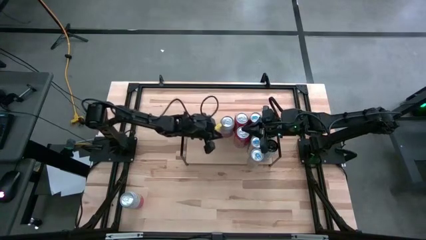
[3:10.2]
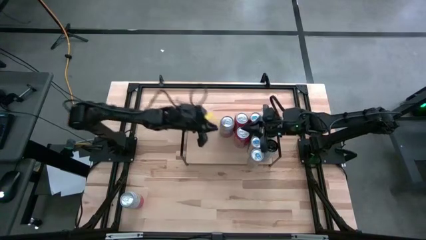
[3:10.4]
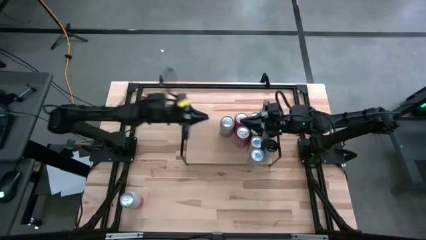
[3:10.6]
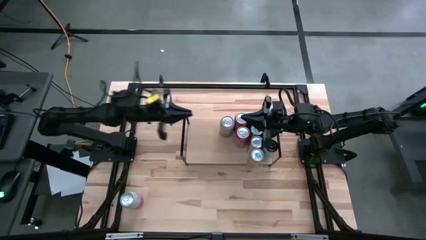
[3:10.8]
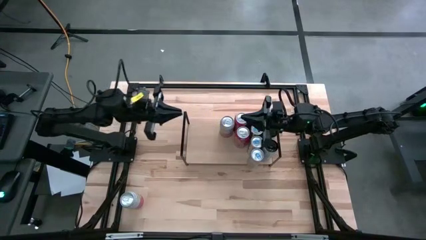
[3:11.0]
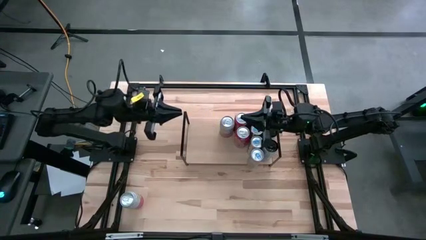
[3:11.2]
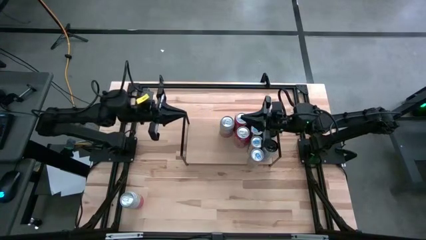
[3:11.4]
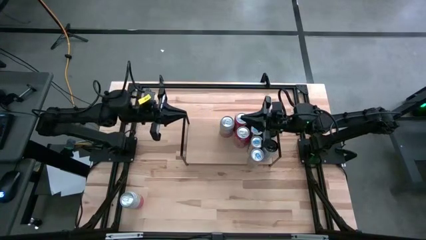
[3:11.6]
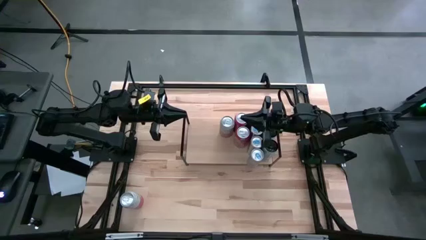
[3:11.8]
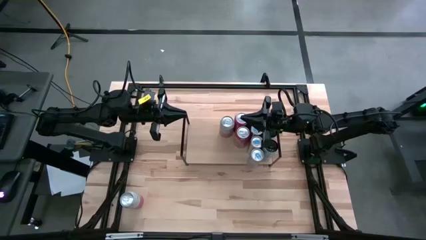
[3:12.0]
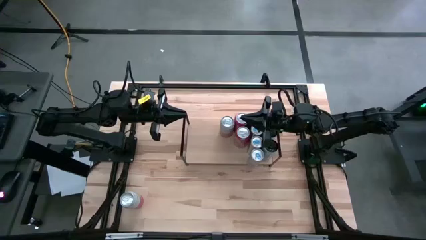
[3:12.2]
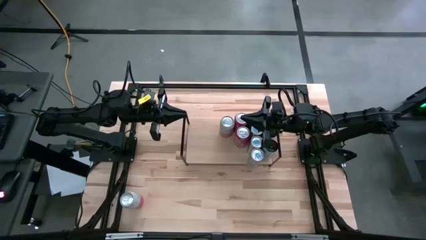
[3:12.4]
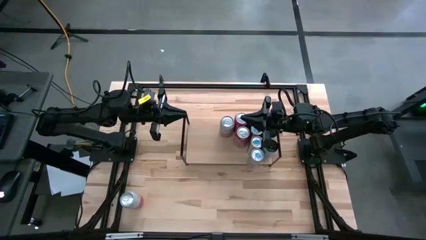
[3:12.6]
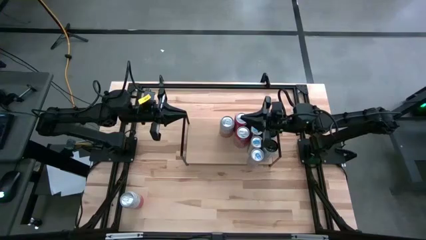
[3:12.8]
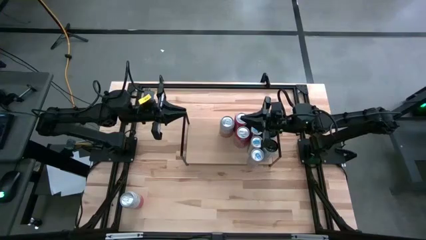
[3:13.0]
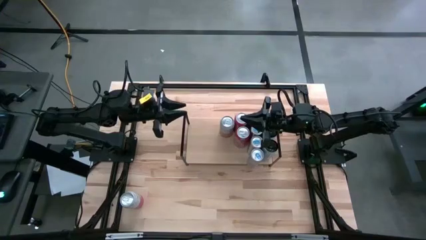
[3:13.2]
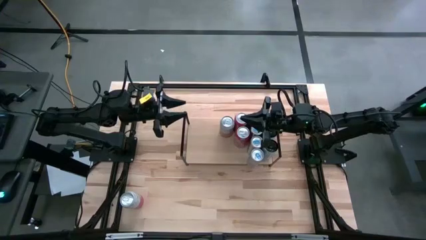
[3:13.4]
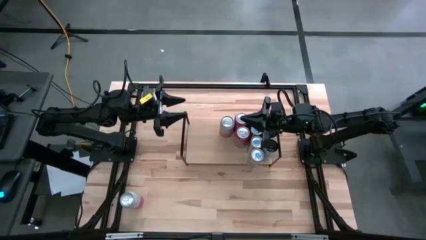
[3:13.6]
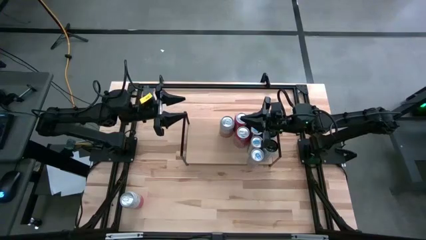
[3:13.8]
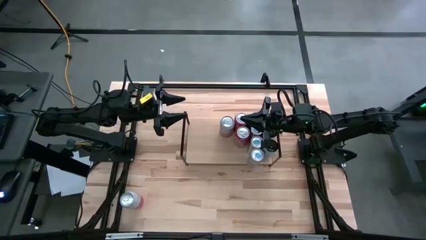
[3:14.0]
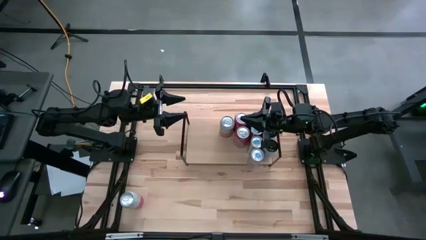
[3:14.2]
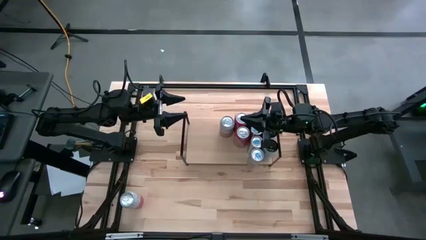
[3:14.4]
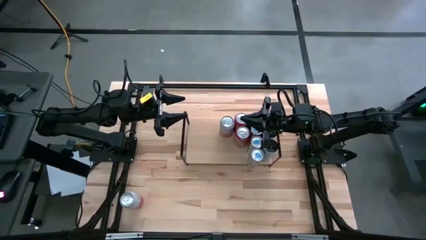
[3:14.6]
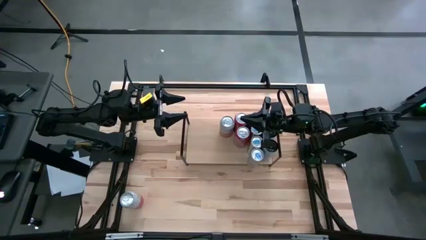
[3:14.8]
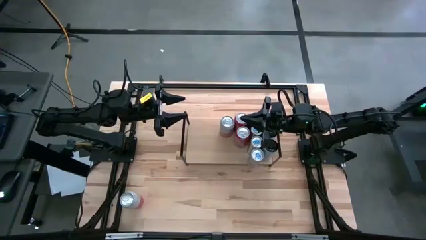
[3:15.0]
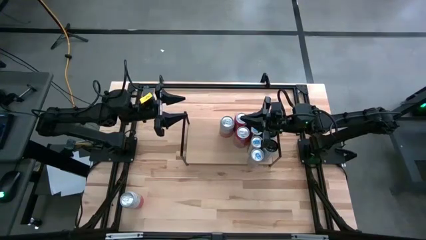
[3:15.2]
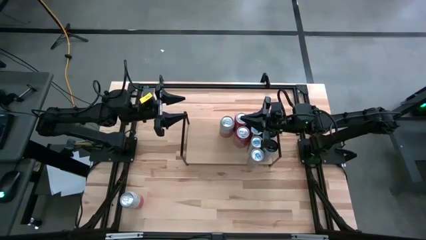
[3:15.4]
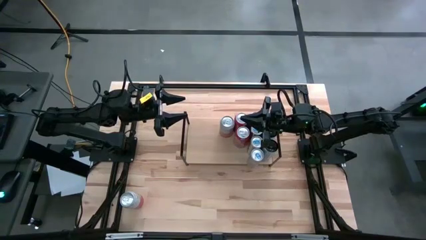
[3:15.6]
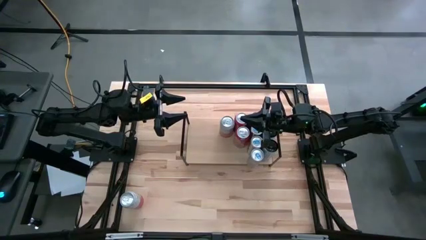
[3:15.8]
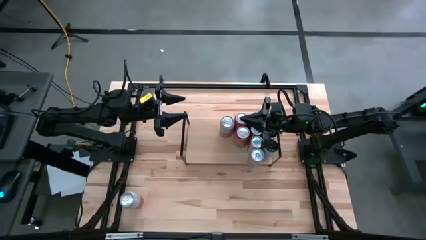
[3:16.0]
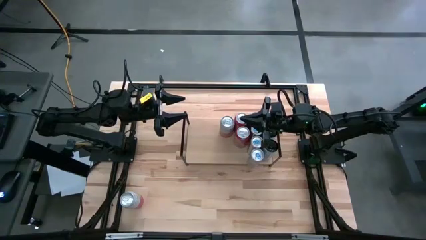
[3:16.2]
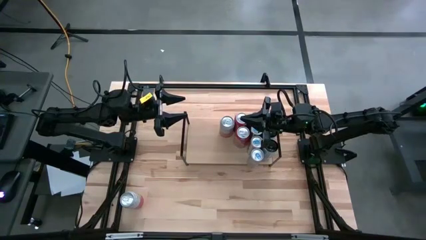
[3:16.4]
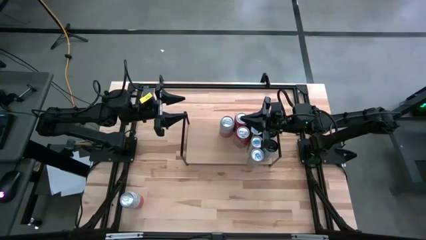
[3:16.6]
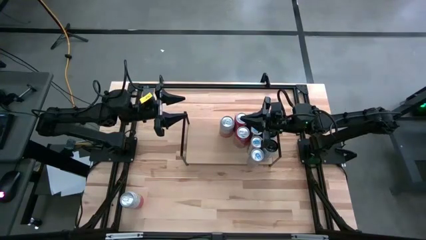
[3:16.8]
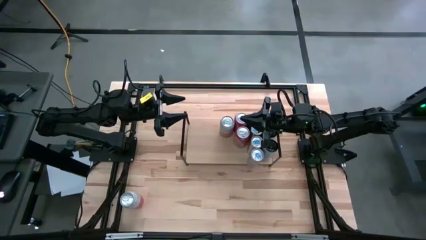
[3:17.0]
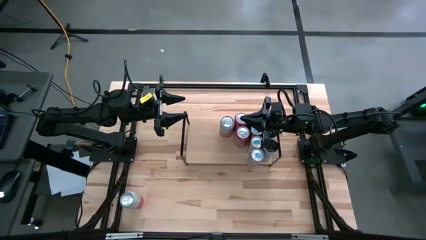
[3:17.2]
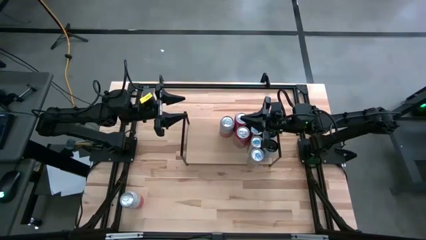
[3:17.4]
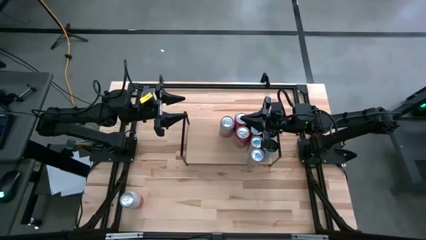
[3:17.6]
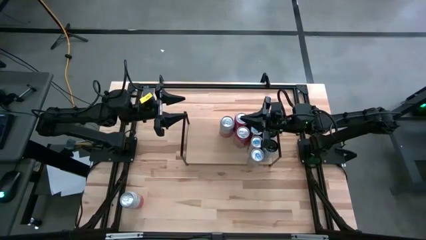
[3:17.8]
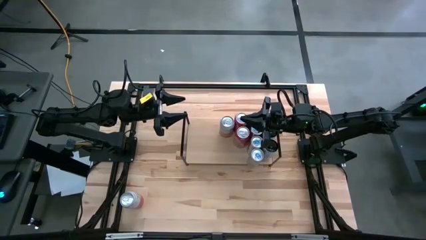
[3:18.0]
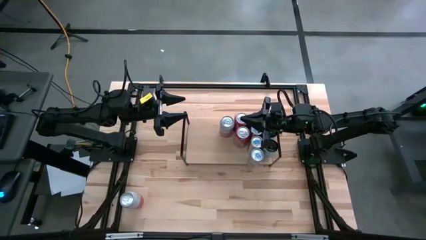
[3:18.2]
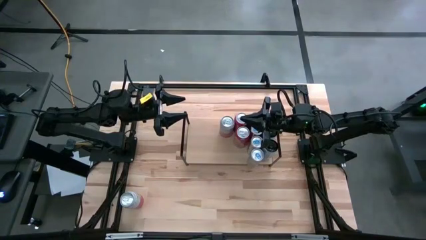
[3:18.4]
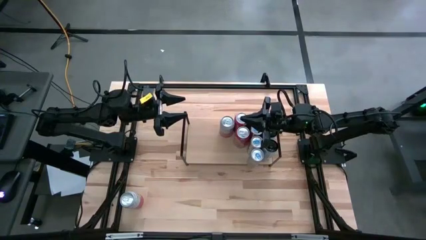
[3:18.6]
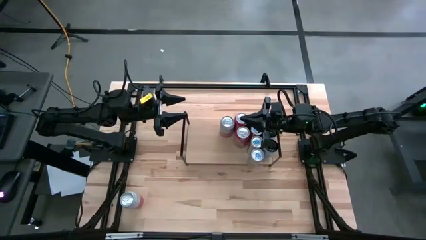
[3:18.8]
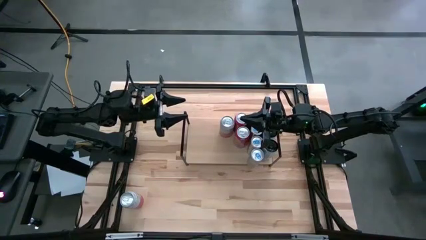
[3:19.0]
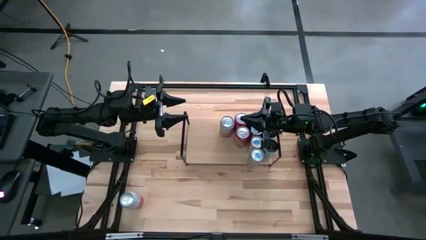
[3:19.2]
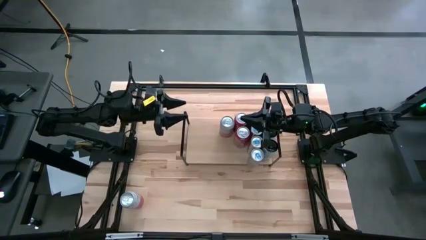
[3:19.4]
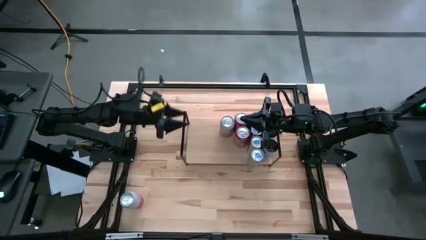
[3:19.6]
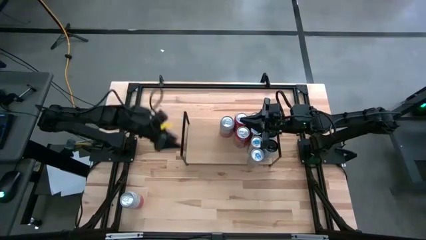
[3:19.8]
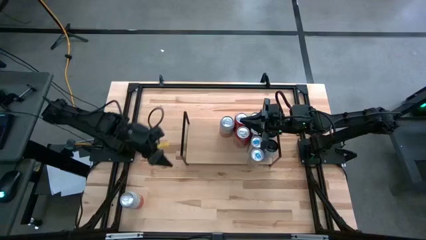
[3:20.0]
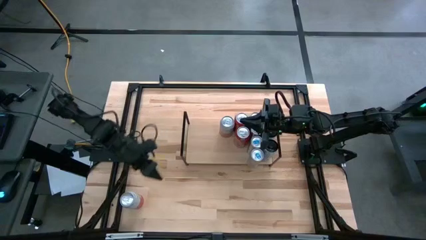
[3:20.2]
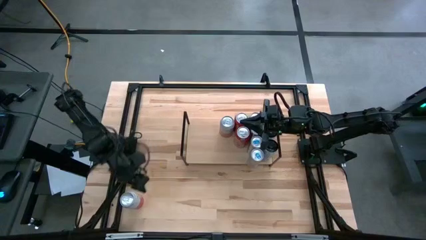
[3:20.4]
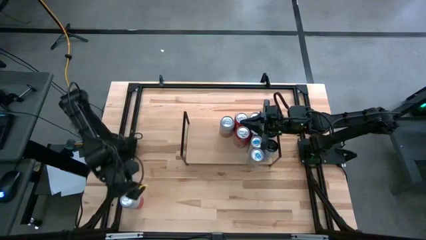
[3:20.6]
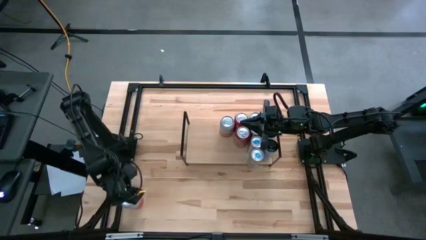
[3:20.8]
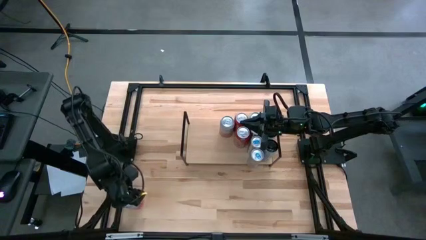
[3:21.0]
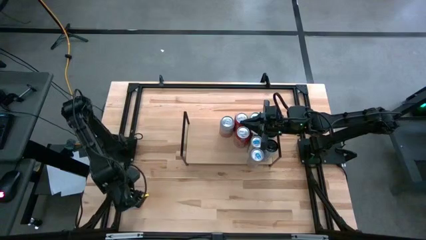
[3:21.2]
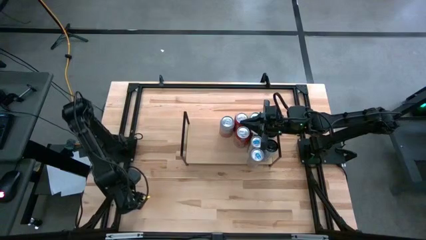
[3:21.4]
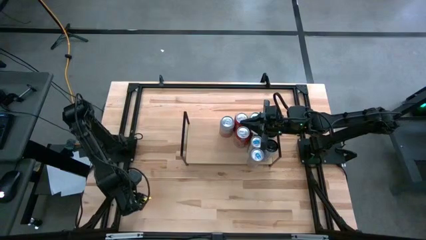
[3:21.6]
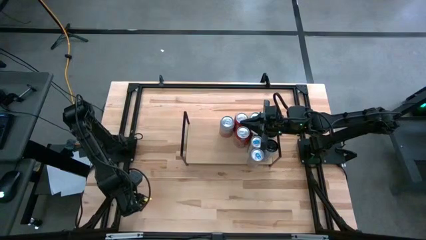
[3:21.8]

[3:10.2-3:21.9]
Task: Place canned beverage on shelf
Put the white pink soda can on the shelf aligned with the other white pink soda can

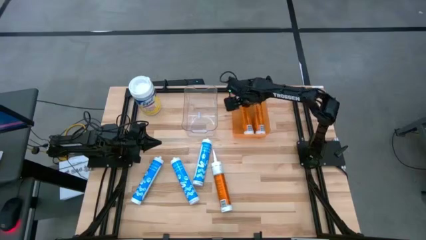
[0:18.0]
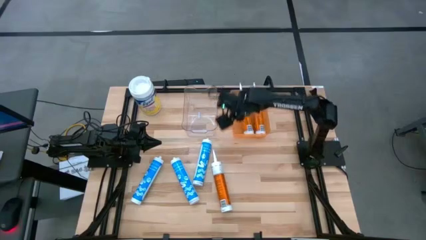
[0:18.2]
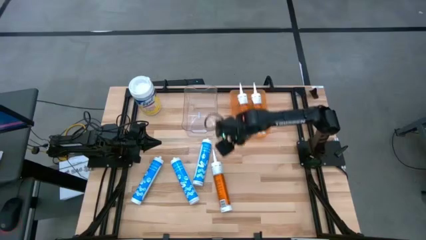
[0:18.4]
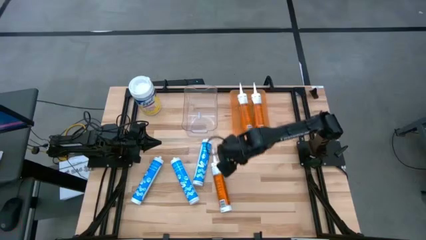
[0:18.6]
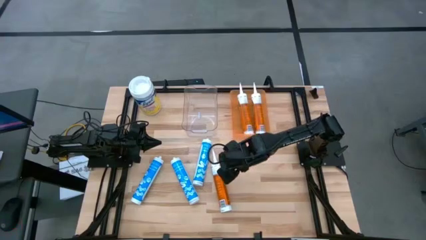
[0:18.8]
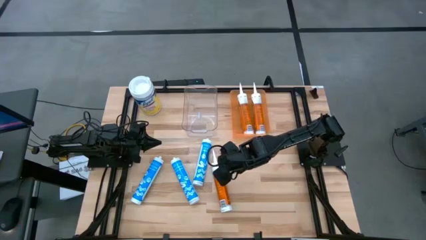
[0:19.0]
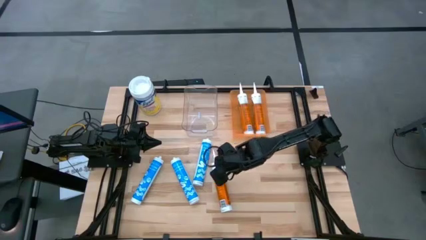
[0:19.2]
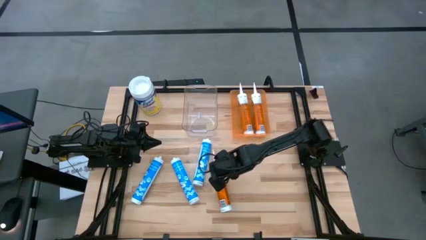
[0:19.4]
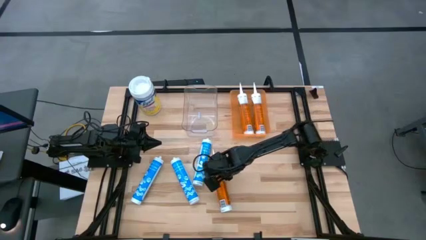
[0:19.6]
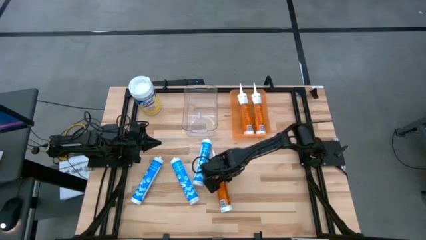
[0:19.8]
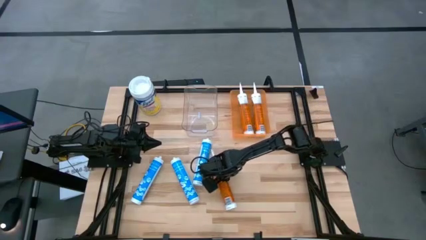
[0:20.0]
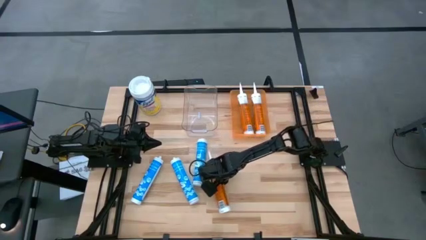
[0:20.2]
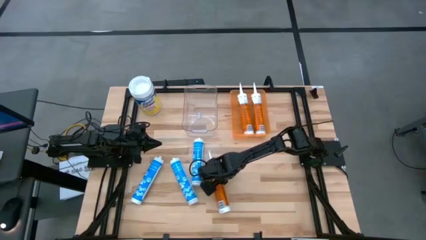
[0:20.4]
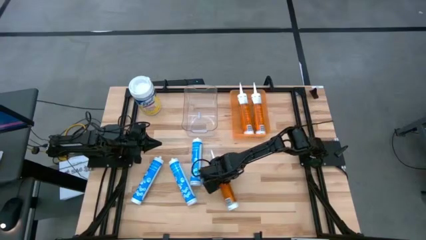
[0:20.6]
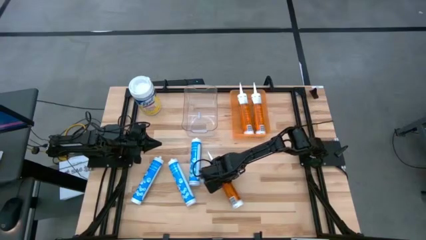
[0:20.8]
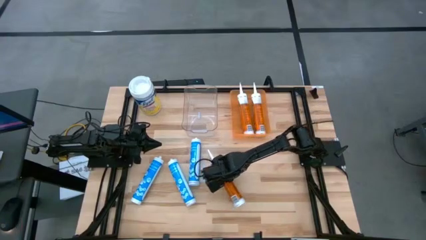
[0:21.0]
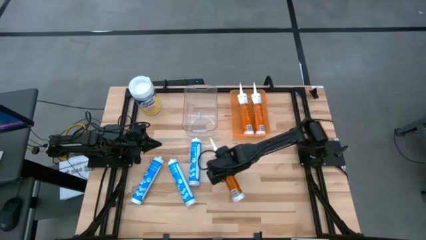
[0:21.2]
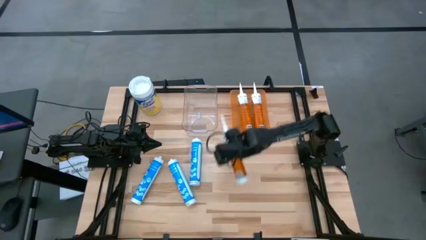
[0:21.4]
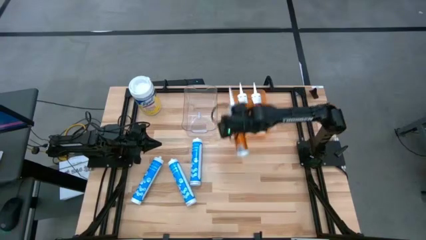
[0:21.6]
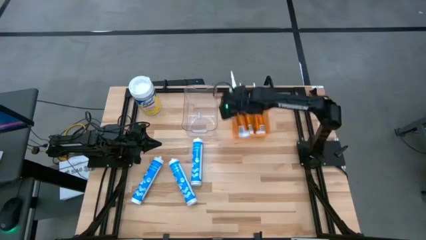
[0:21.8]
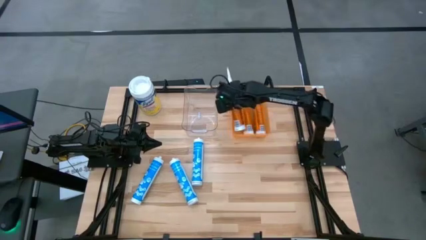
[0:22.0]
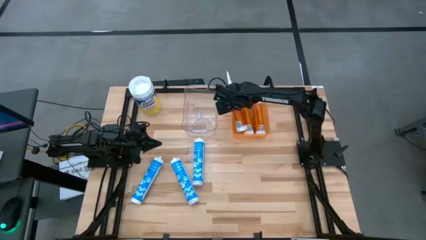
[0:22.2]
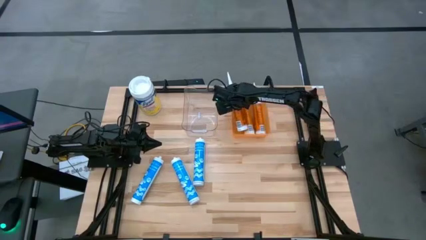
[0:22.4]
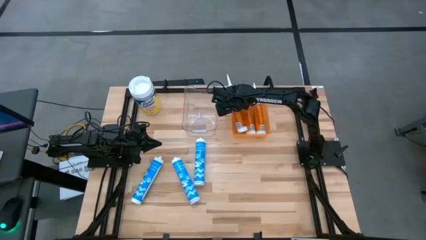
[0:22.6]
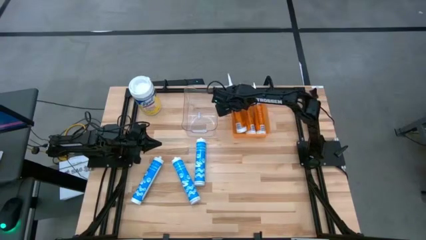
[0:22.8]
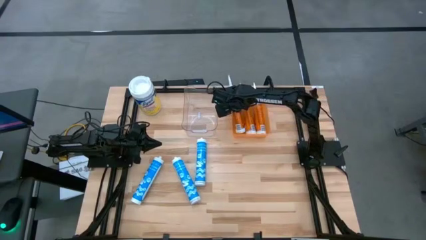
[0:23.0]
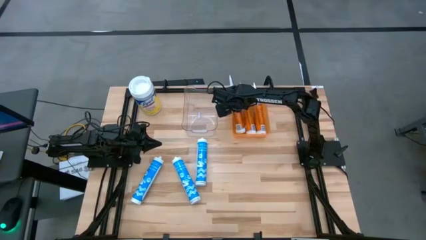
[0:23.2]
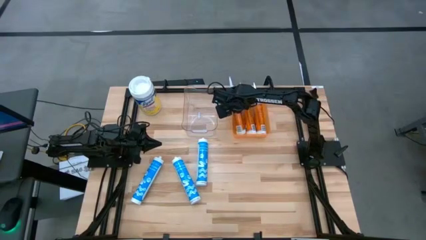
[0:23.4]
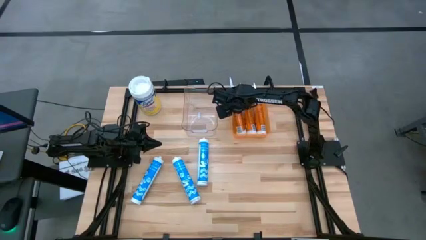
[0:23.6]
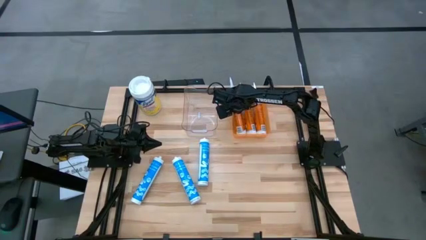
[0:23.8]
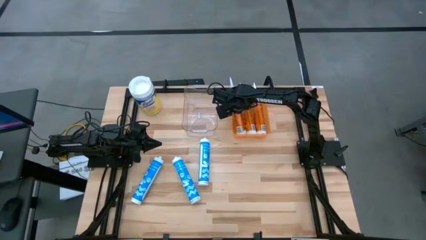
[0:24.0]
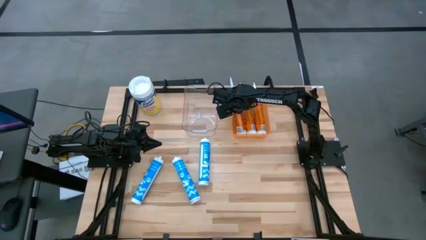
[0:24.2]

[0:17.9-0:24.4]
Task: Pick & place silicon tubes, Sealant and Lysol wipes
Put the orange sealant into the orange bin
